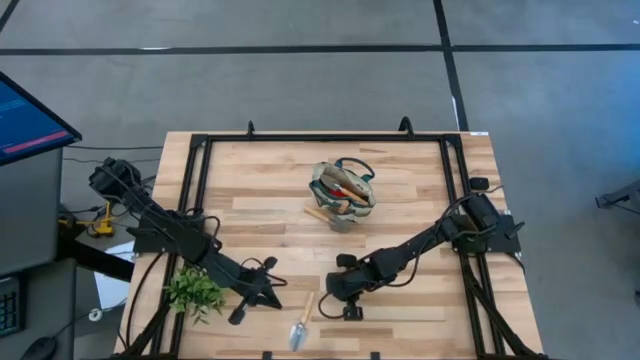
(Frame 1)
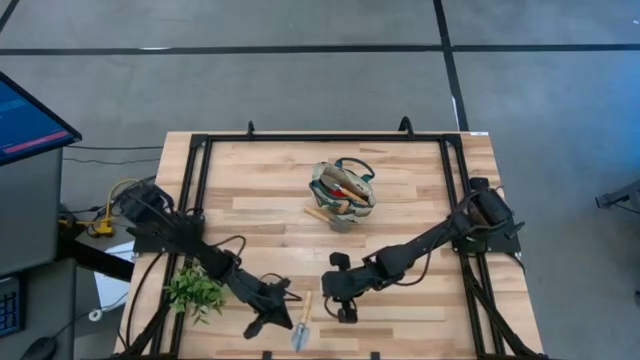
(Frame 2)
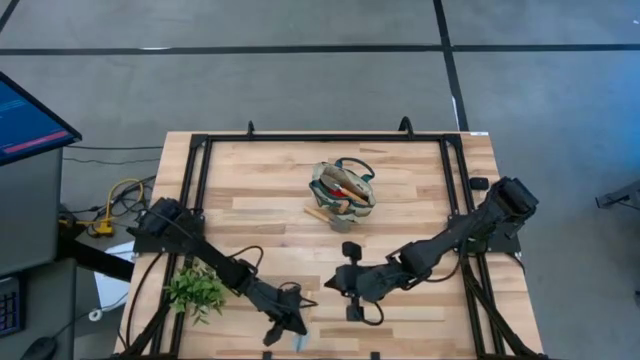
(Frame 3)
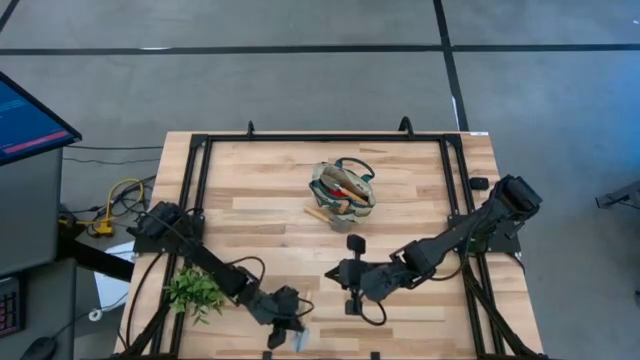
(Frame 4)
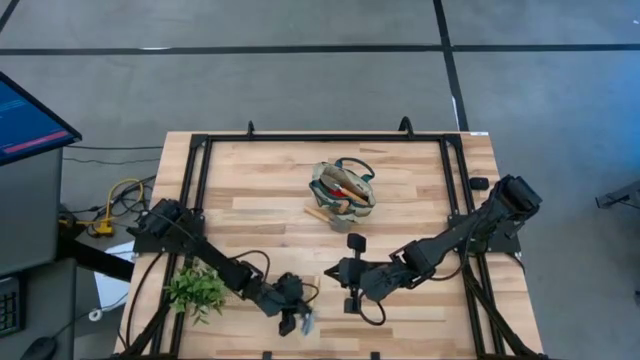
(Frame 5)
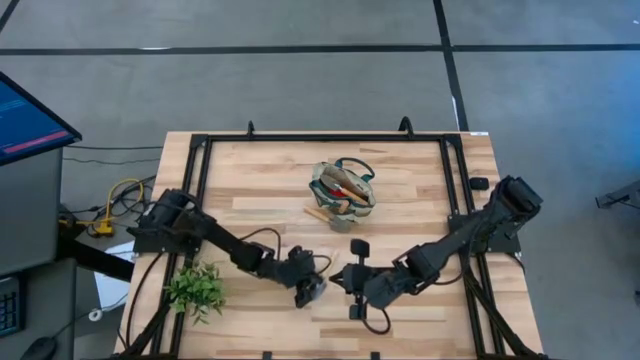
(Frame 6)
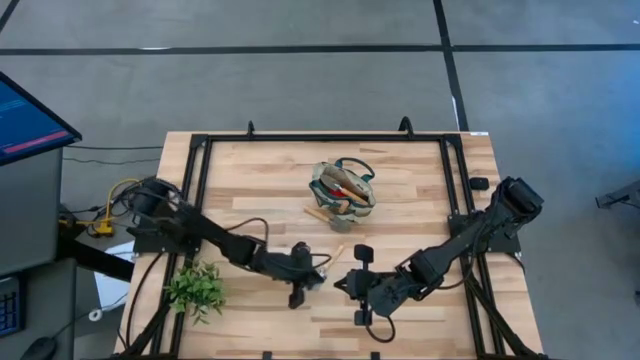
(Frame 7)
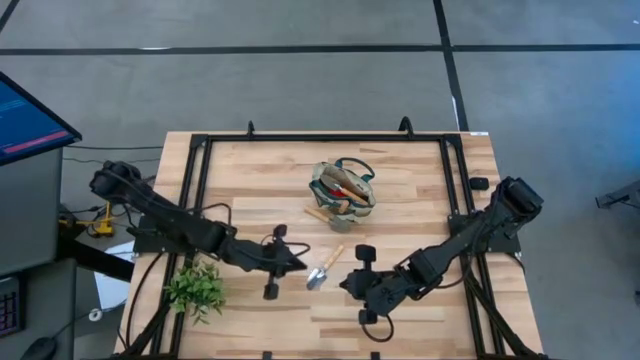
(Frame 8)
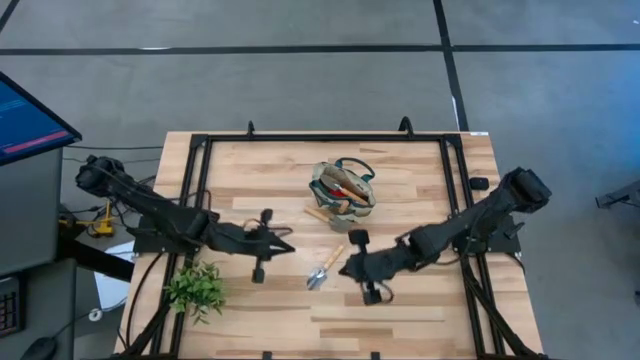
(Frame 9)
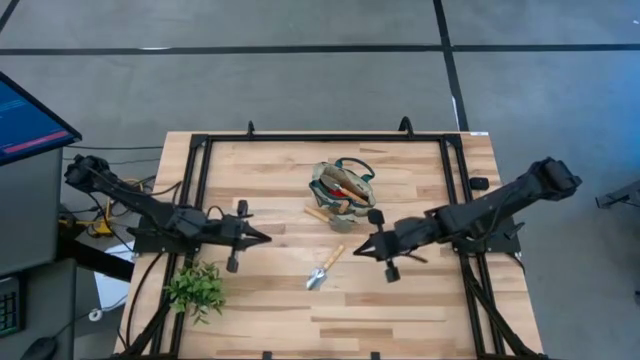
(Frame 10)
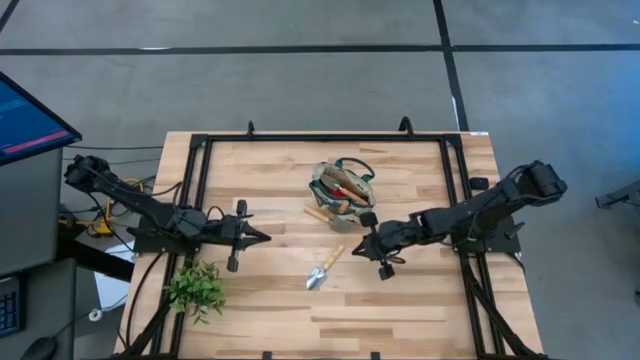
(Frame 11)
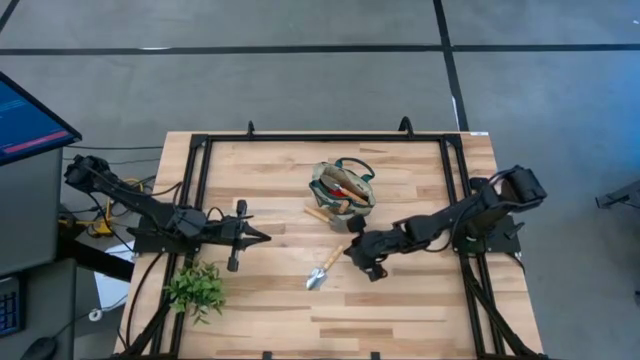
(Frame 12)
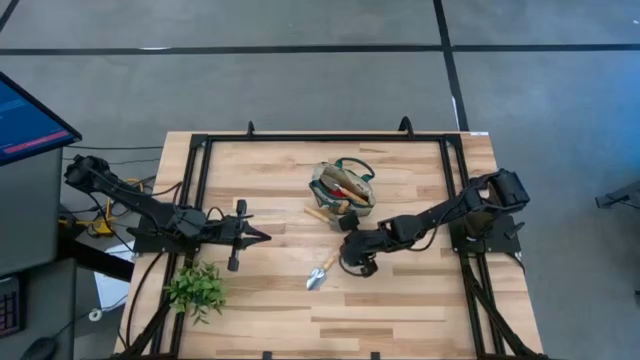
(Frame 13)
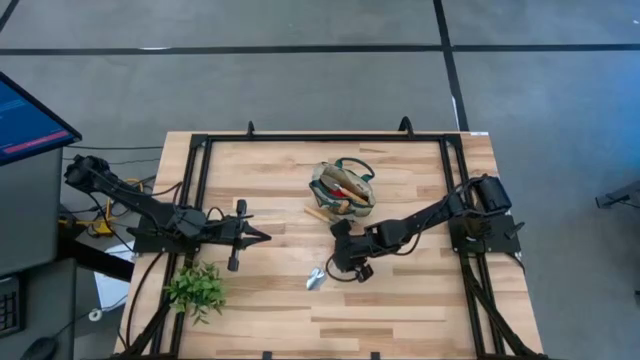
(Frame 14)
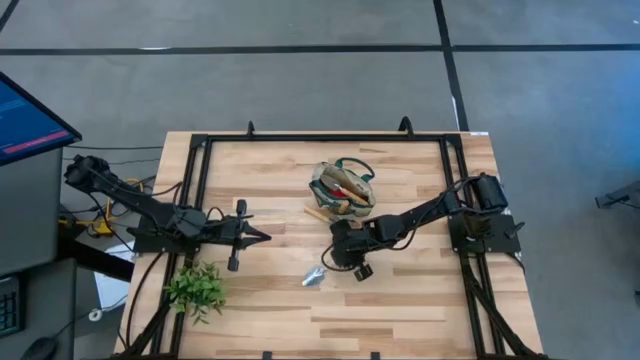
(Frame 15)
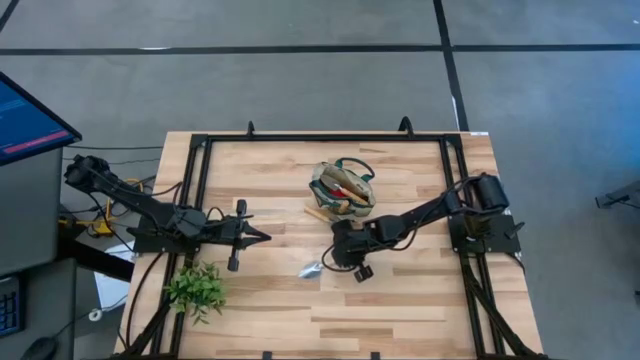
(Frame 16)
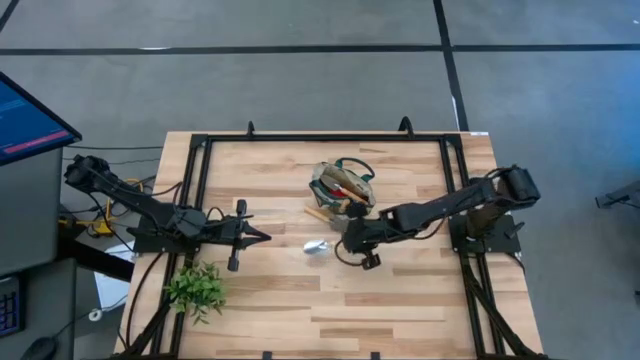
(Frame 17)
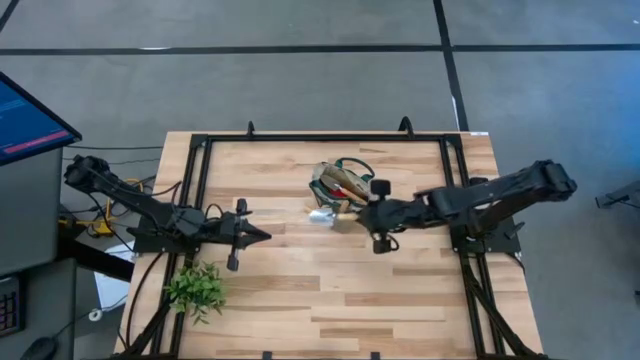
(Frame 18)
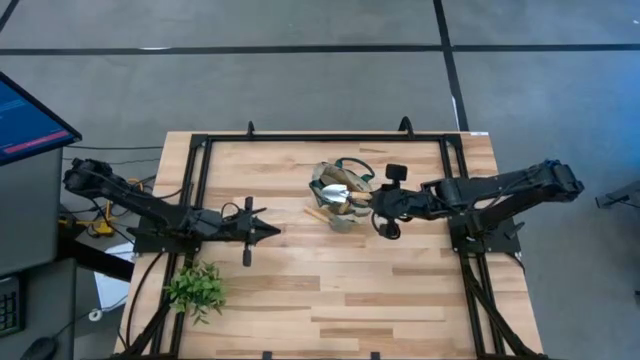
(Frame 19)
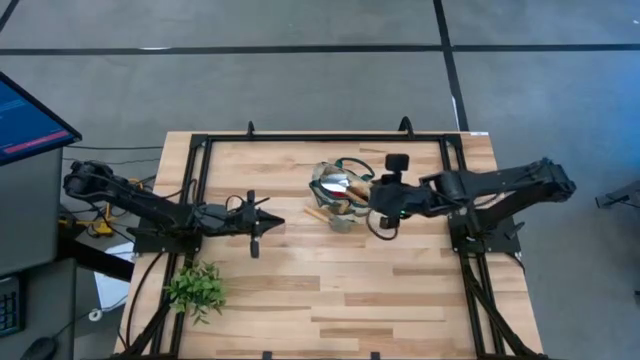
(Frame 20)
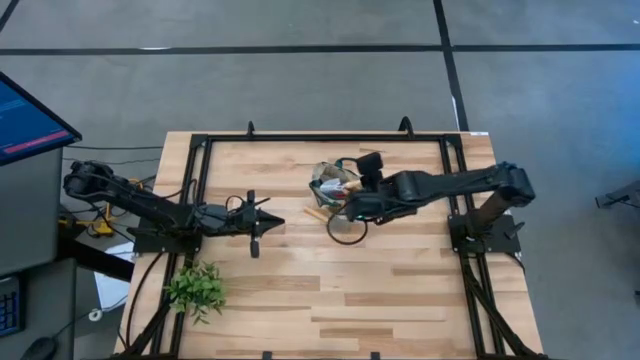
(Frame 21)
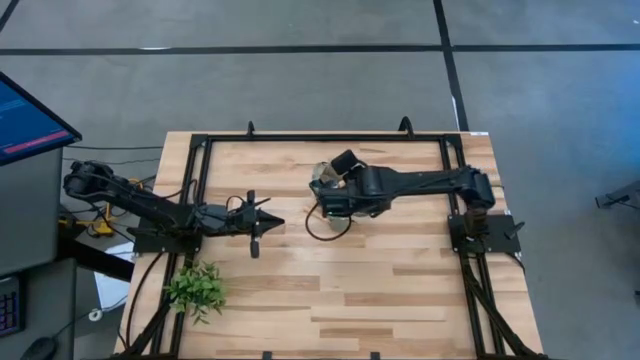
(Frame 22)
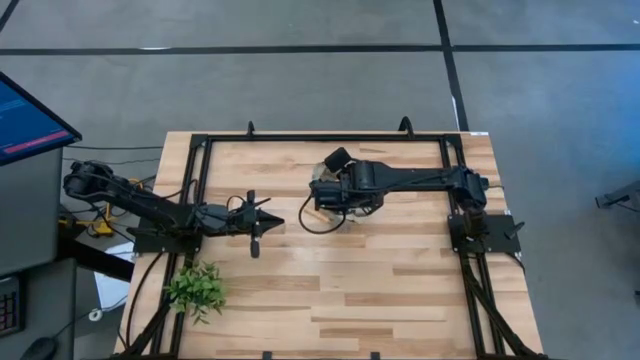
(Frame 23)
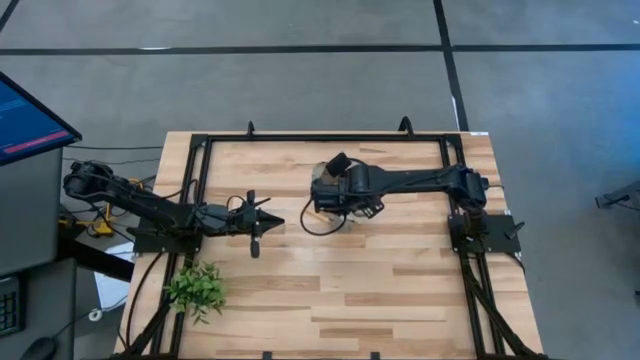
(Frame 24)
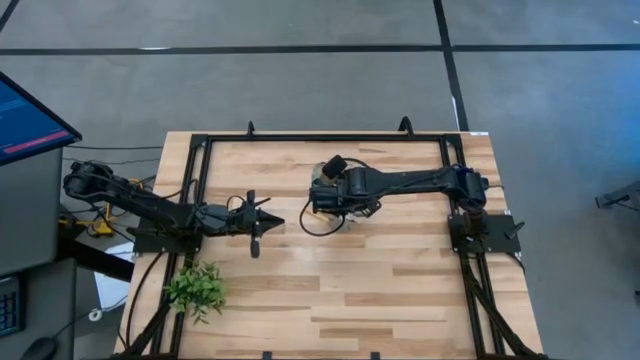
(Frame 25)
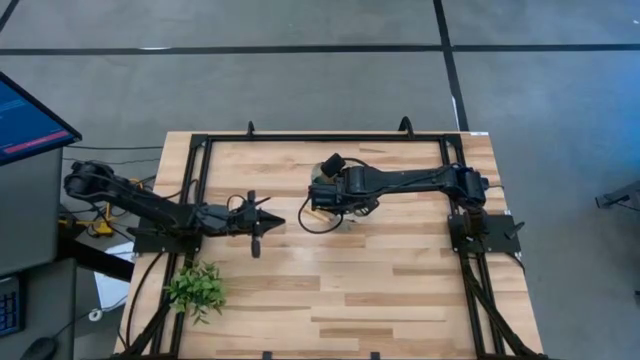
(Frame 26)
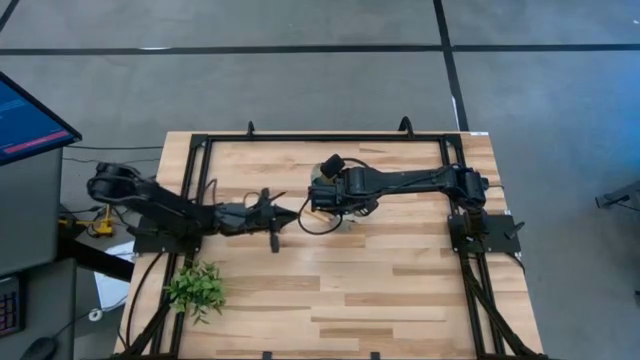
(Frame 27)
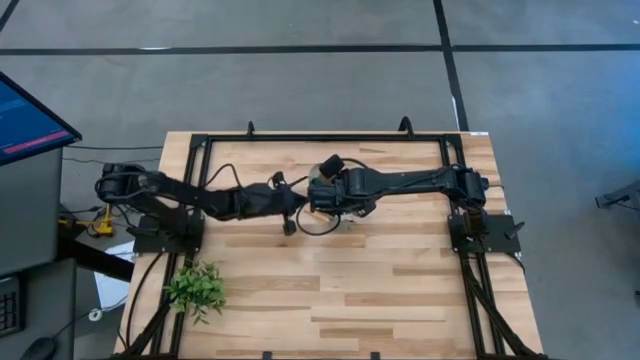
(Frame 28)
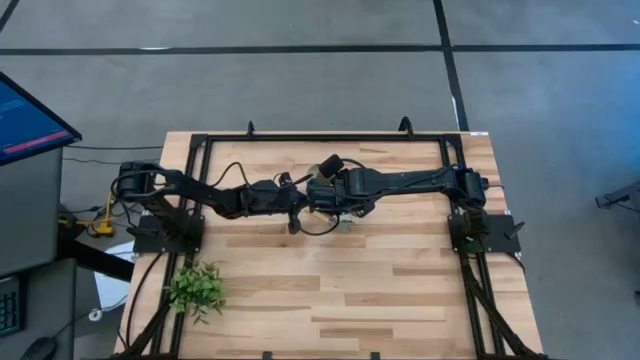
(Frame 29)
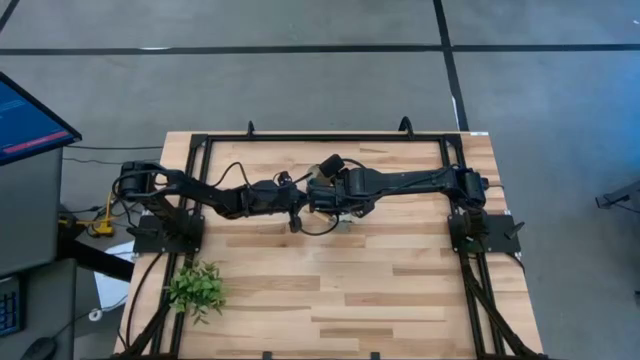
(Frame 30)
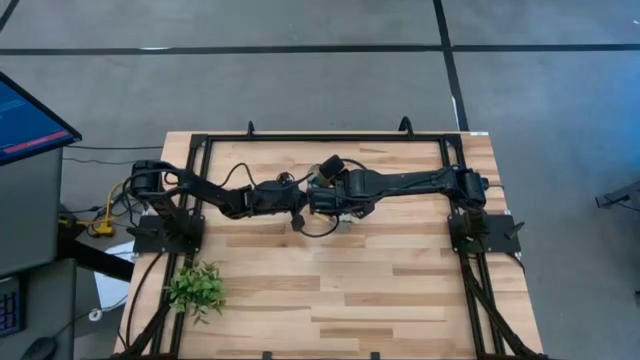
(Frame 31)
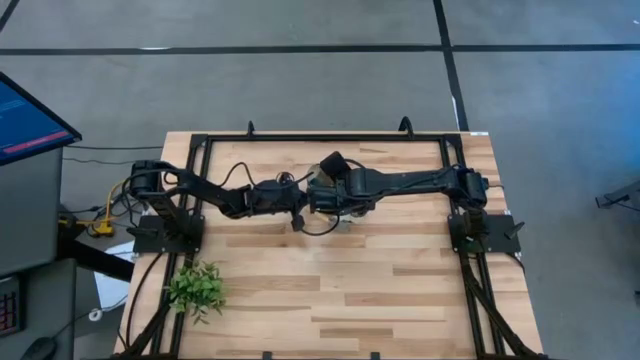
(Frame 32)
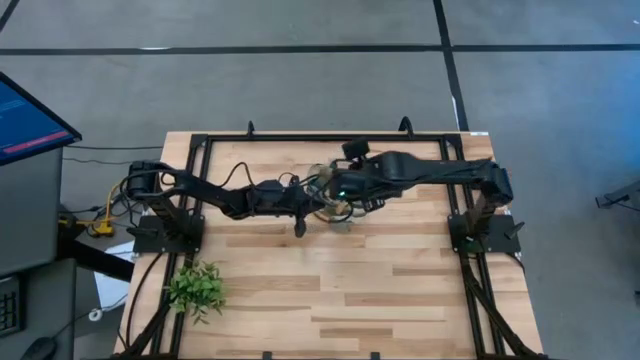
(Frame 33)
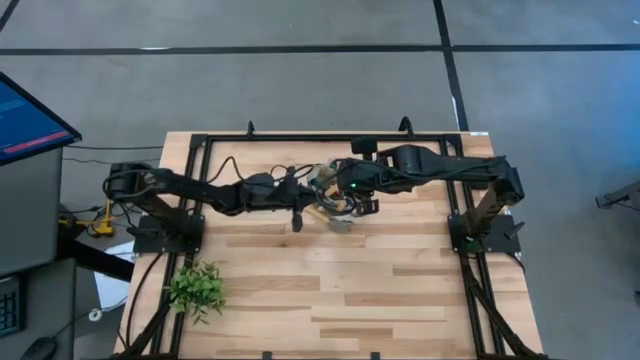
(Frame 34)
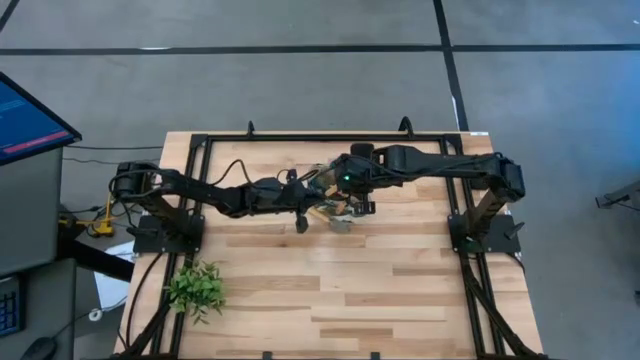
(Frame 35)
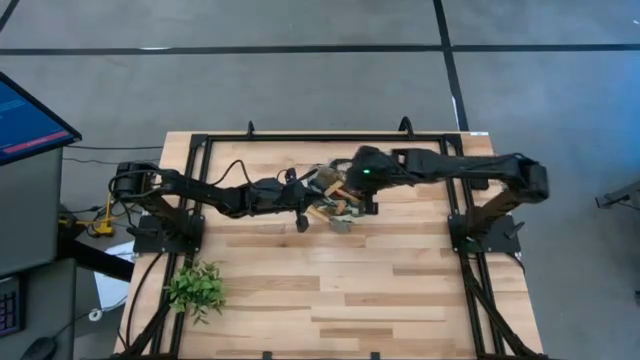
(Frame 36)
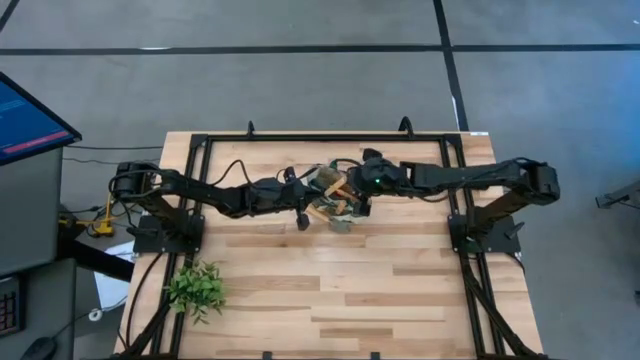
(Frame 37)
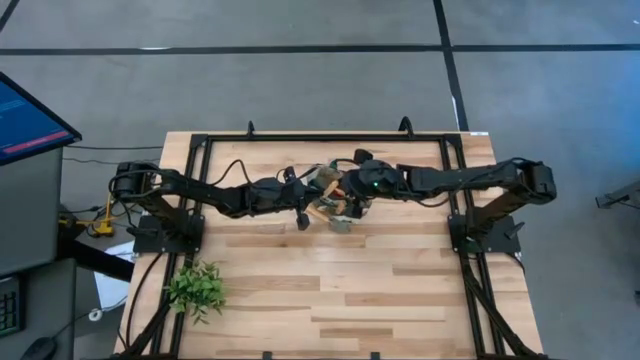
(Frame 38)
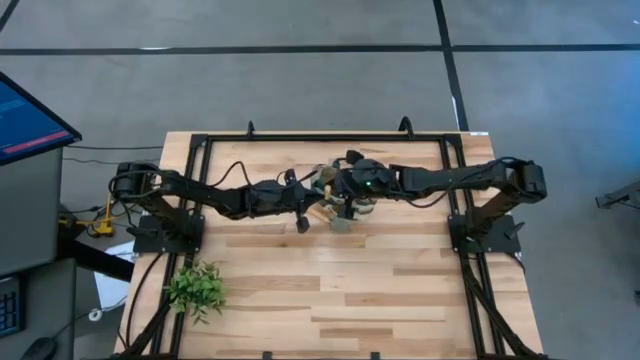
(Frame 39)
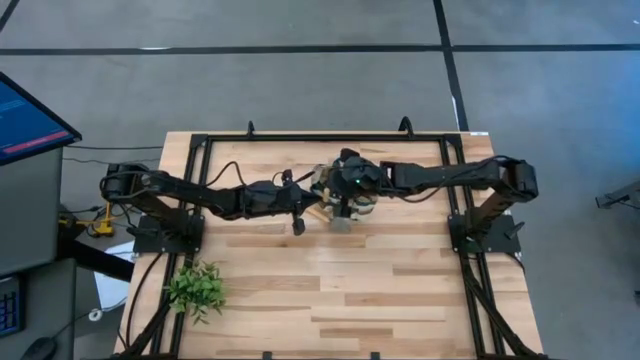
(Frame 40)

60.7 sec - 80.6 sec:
Task: Pick & Place Garden tools in Gardening bag
Put the brown trowel into the gardening bag

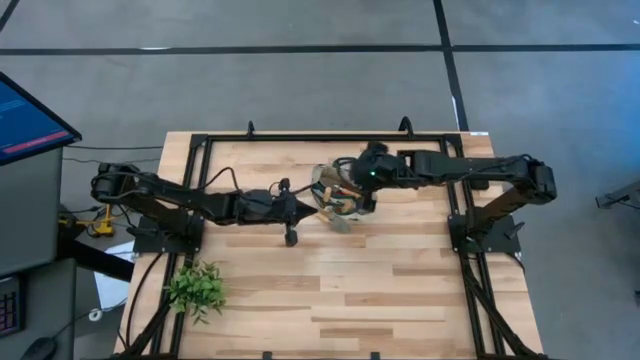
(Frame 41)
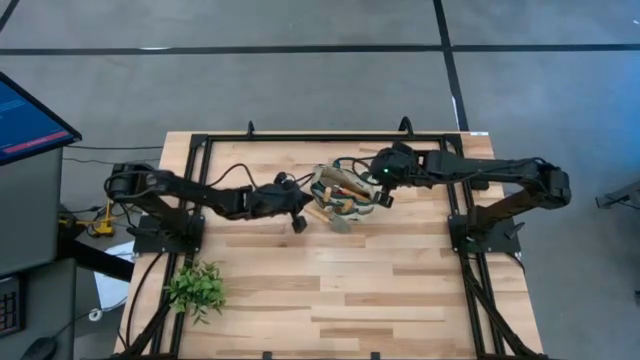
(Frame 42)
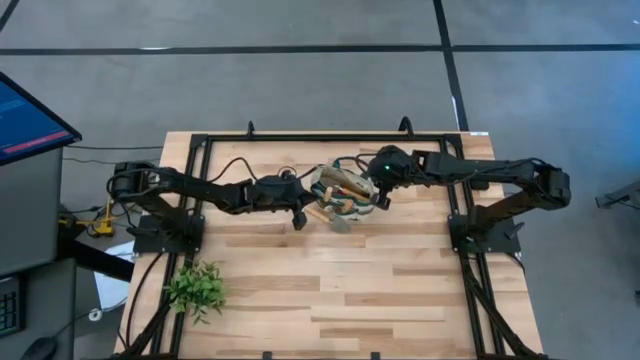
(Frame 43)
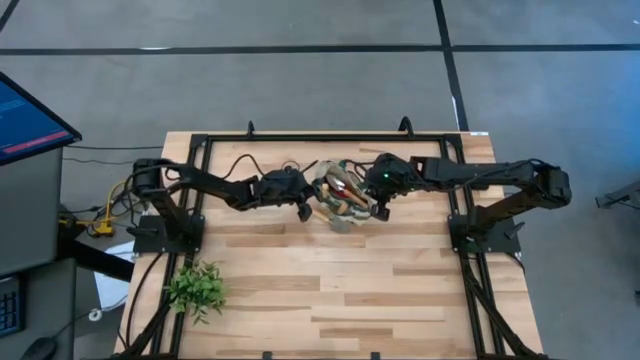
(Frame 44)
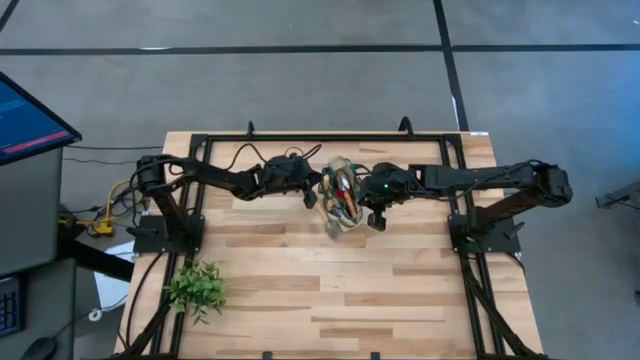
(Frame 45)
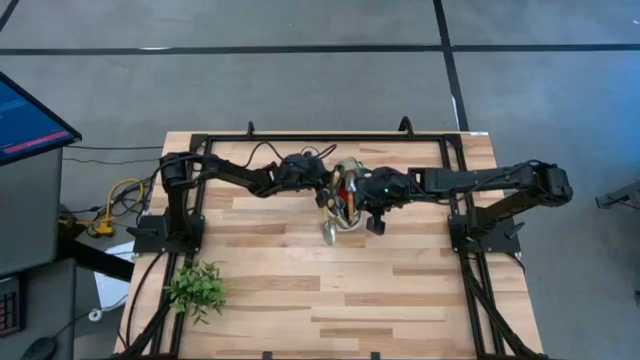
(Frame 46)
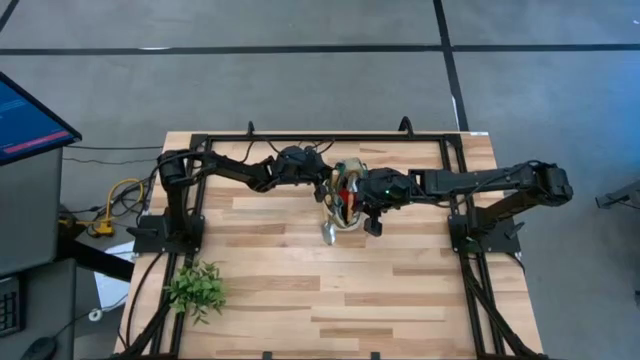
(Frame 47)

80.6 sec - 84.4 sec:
Adjust the gardening bag
